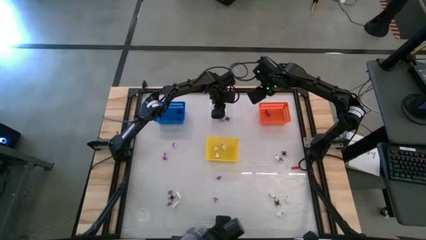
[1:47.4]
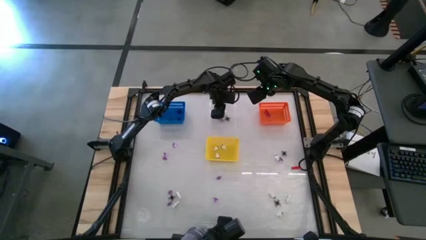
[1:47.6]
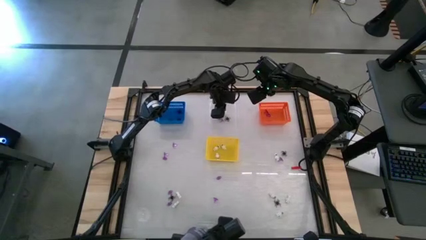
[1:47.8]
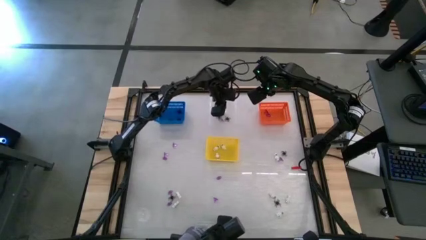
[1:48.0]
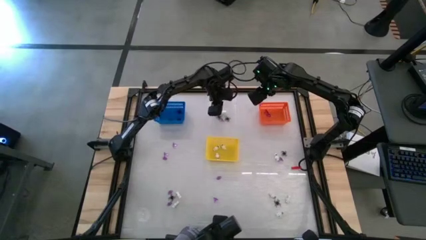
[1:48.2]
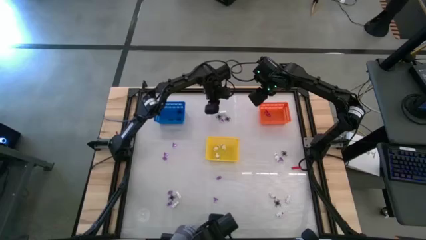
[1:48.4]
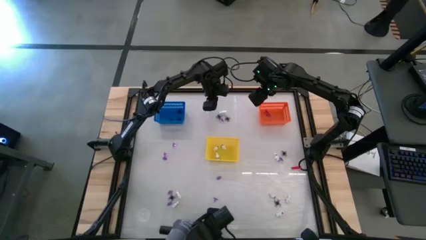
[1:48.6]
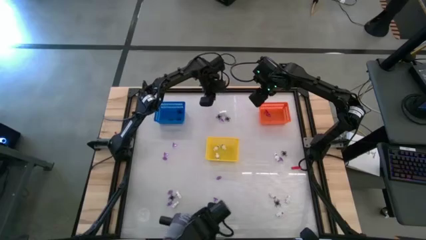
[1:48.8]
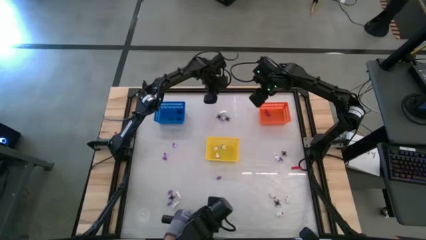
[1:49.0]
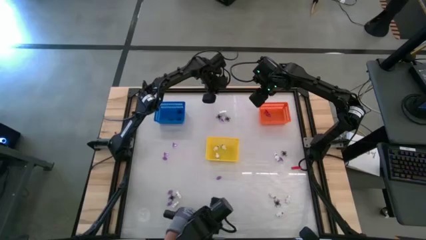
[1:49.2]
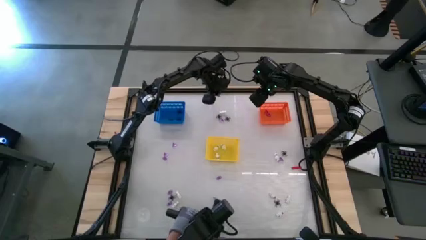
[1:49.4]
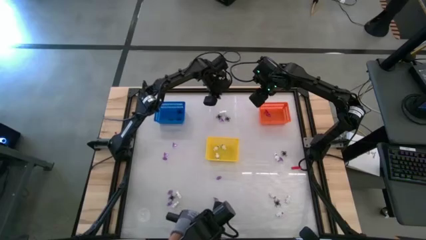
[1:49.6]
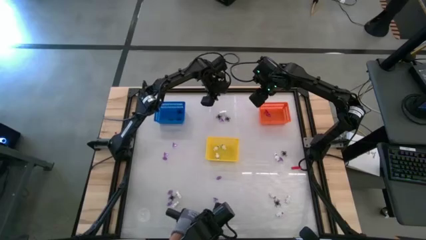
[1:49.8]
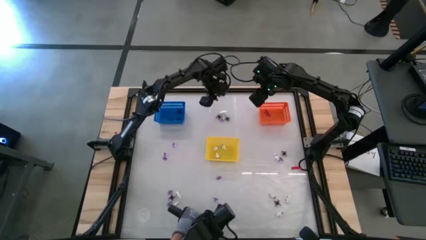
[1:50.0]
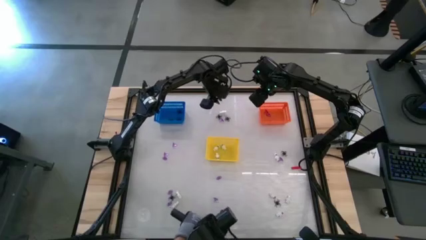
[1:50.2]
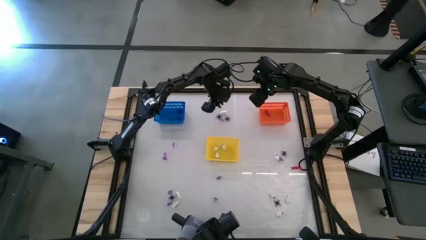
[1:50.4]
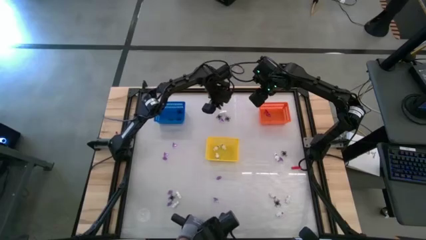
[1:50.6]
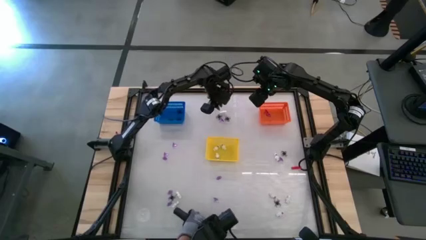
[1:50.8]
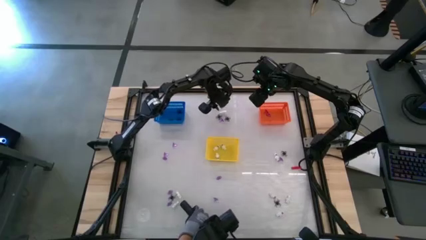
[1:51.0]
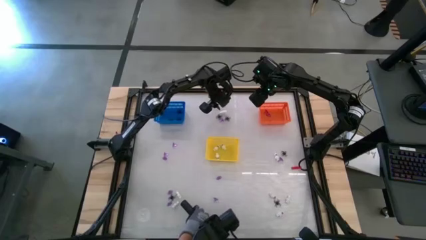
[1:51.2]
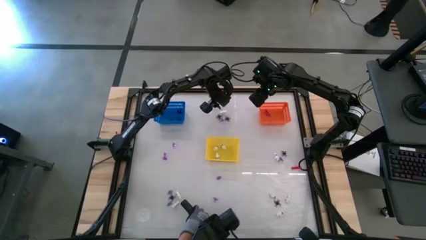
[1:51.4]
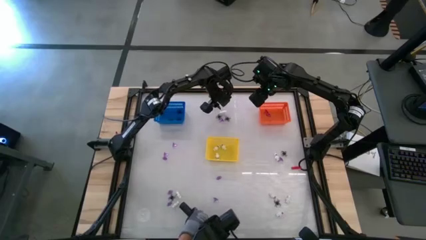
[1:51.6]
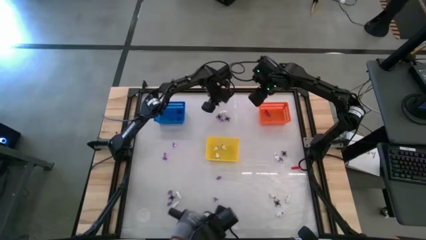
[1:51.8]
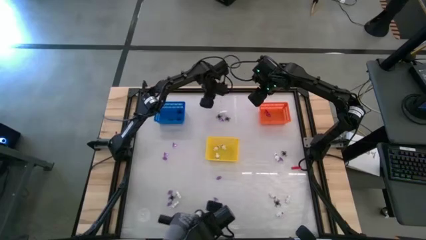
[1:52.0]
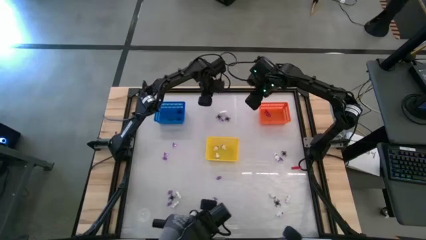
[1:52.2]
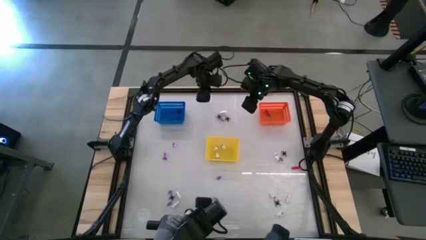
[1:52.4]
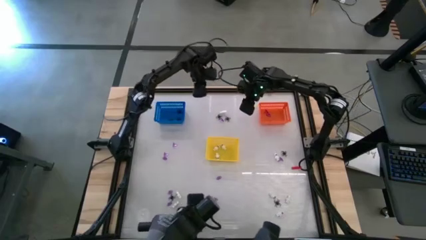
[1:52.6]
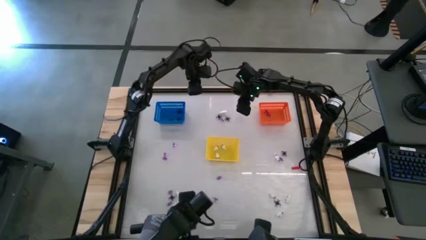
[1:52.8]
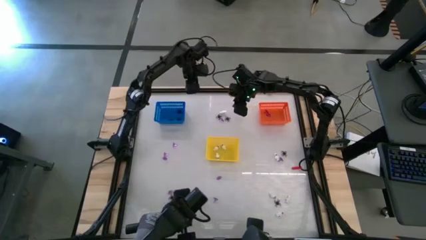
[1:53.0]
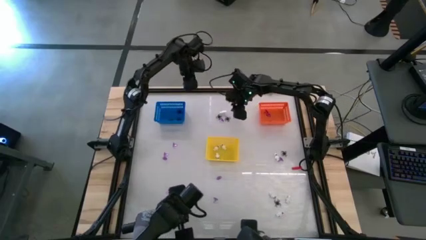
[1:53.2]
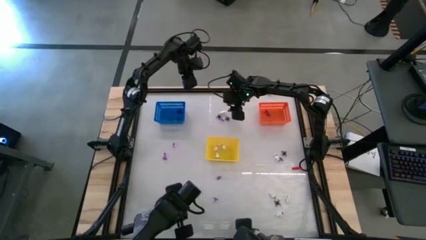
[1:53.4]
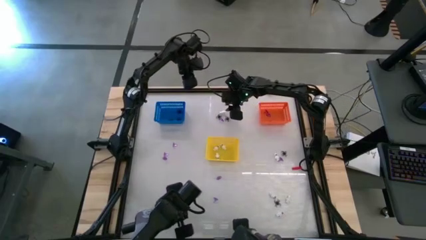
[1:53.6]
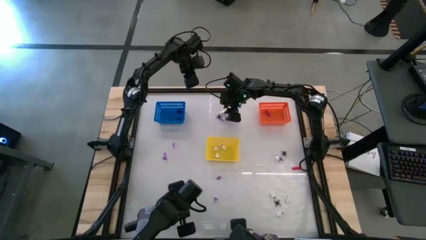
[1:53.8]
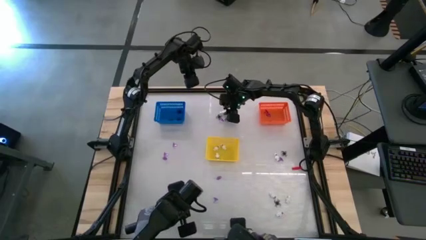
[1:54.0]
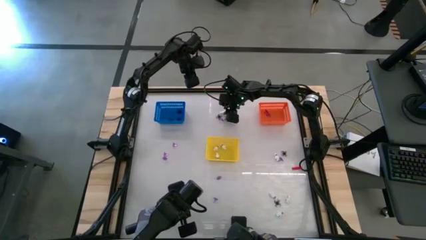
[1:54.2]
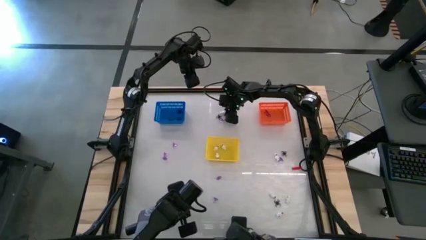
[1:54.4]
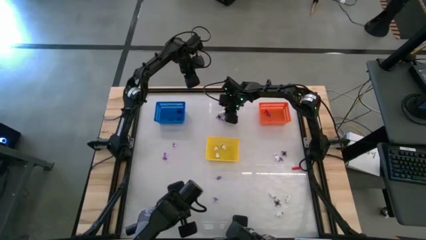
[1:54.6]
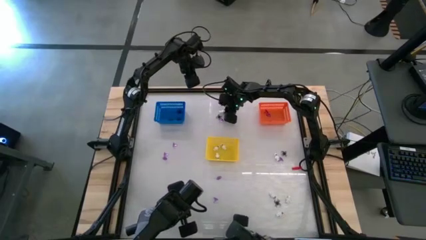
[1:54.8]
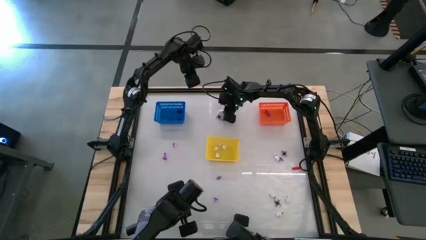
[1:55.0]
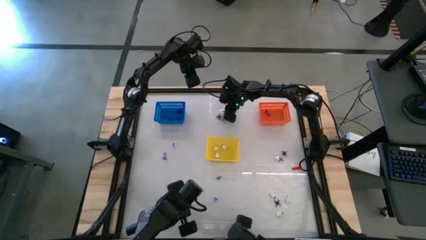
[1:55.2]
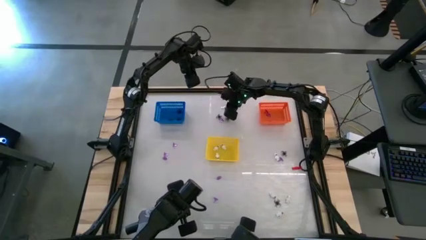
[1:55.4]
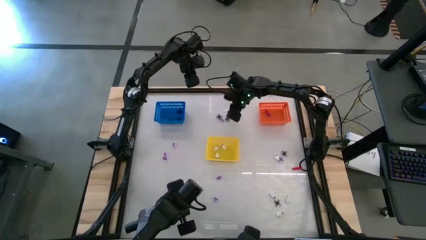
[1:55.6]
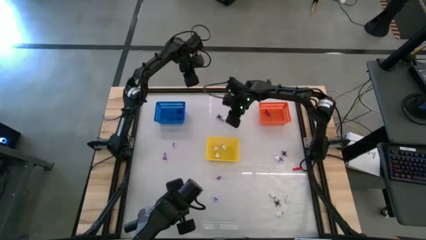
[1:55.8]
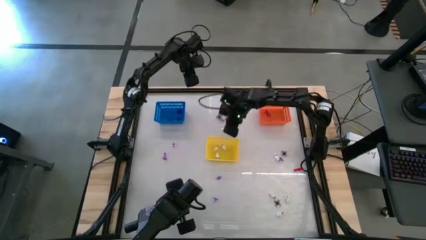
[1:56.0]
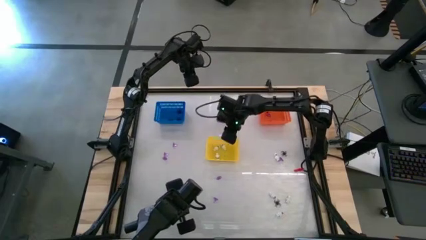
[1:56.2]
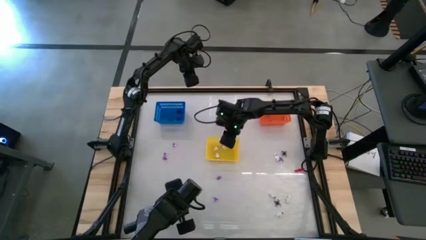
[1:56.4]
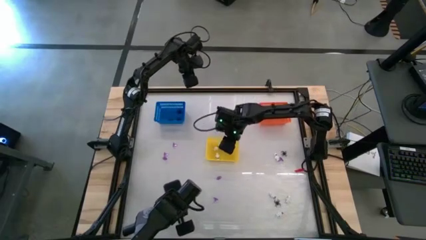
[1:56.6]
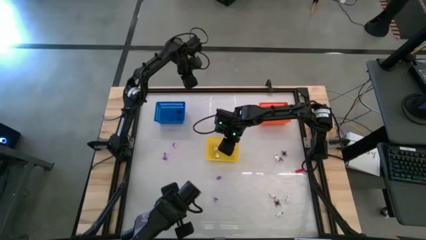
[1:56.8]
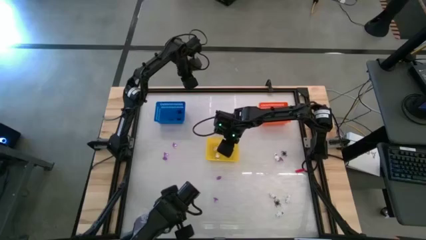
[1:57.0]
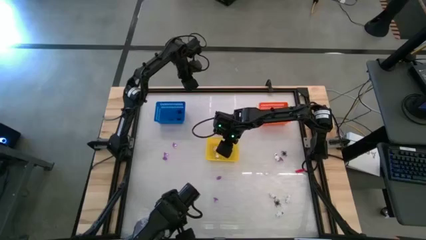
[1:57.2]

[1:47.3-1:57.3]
Task: Sort Halloween decoration
Put the white skeleton toy into the yellow bin

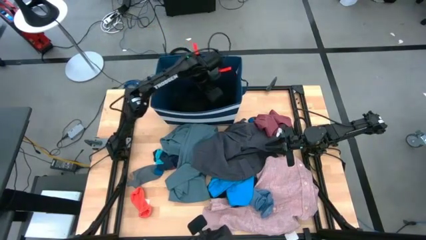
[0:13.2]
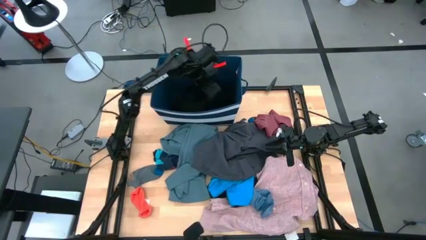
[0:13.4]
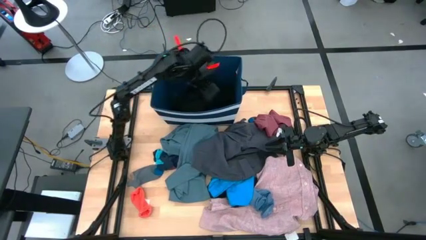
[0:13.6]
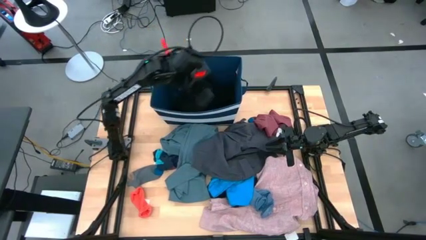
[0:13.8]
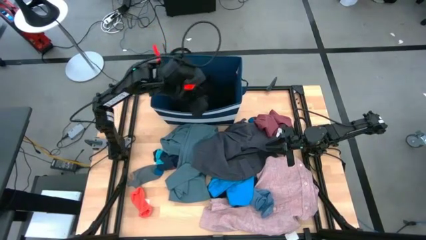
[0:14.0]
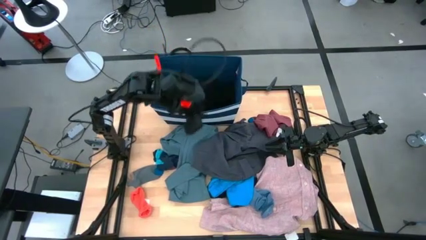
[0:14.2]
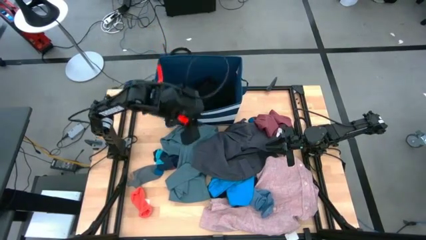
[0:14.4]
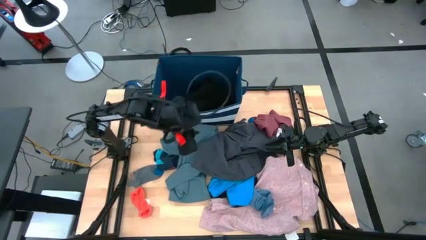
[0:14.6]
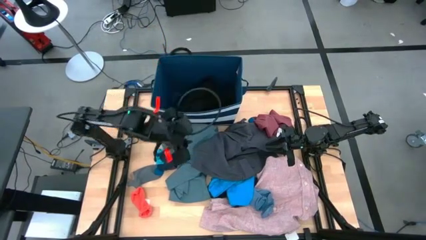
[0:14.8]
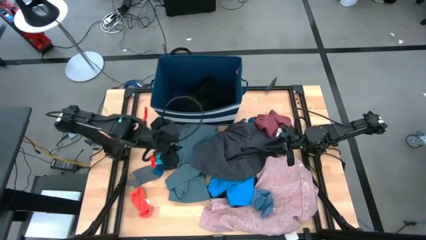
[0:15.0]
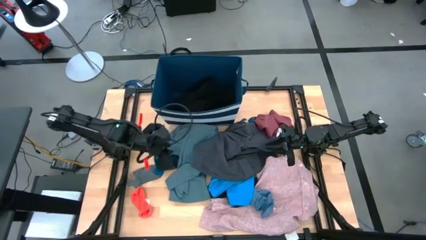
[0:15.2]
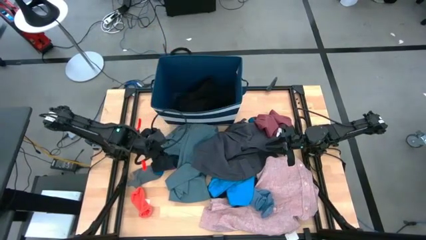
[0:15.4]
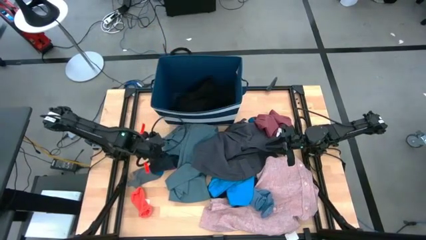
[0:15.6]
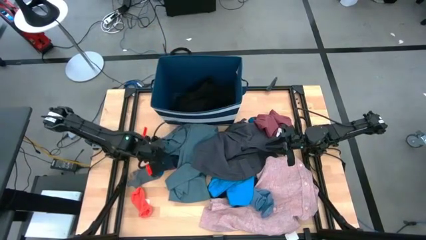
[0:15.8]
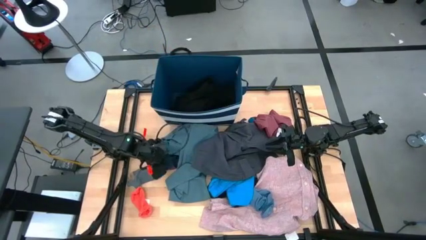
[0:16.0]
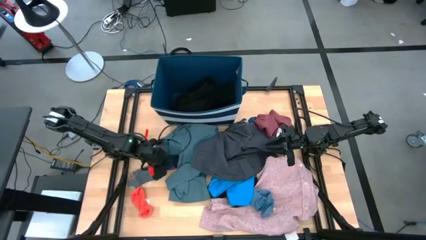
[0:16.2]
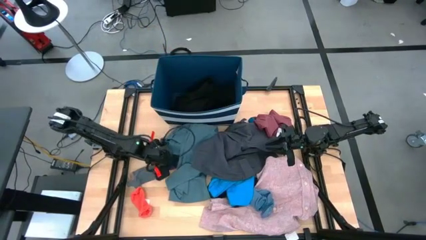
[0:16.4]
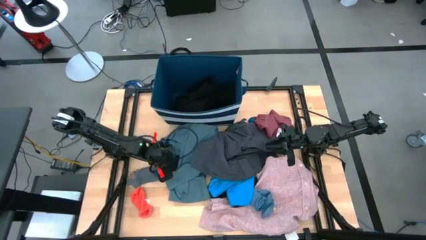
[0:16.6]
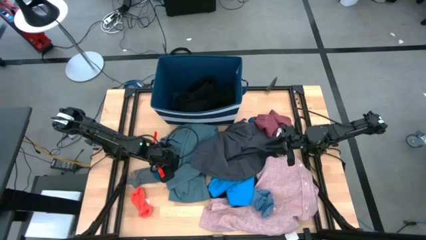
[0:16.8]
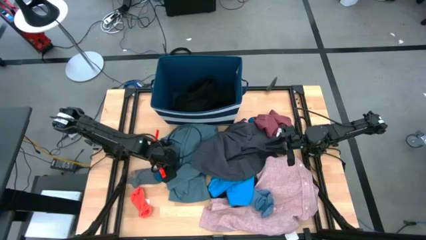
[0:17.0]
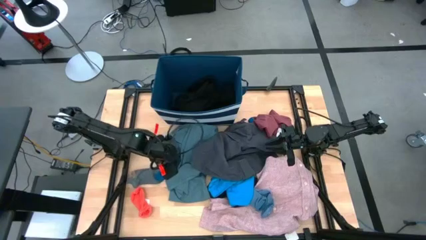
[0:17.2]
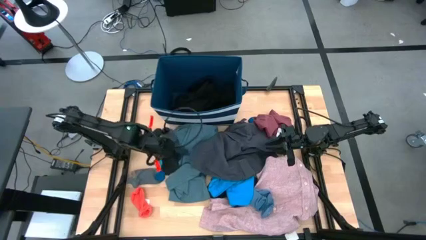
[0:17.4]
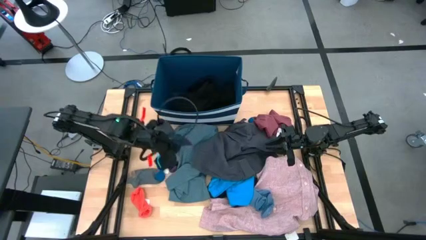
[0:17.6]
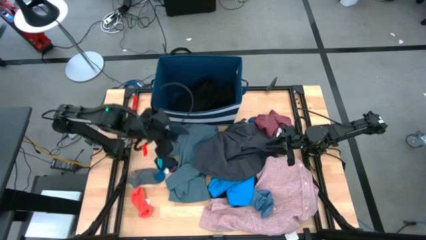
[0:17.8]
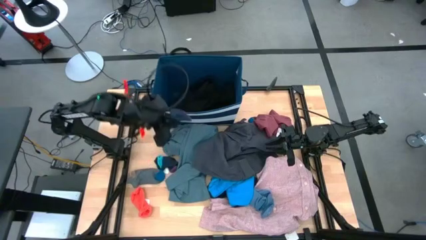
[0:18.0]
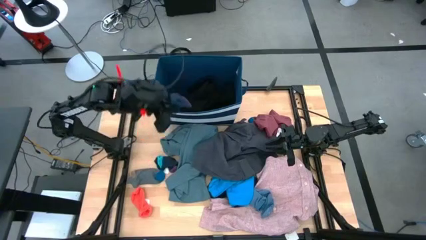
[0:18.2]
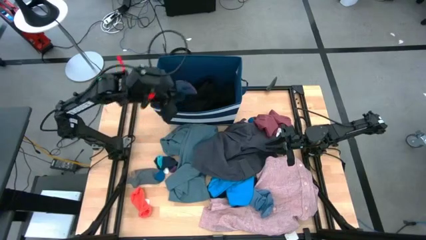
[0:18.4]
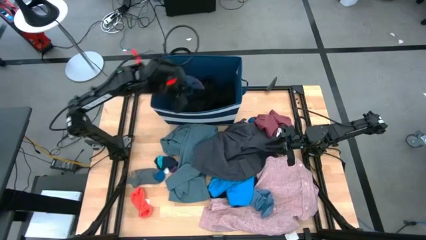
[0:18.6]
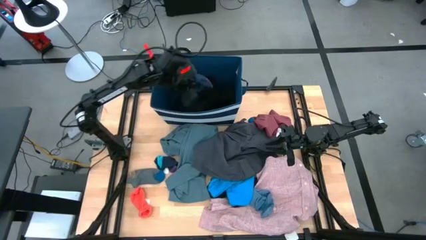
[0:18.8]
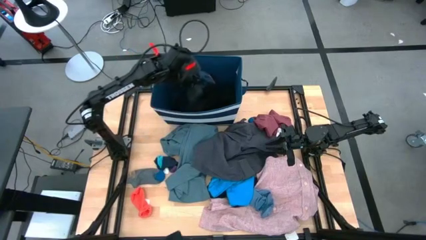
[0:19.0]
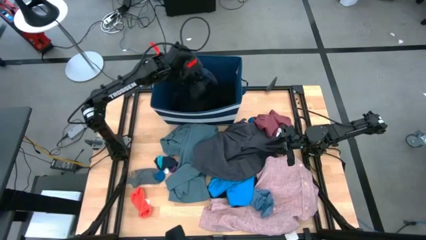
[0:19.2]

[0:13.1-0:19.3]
Task: Sort clothes
Put the bottom dark blue sock into the blue bin
